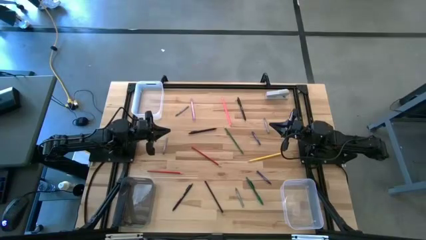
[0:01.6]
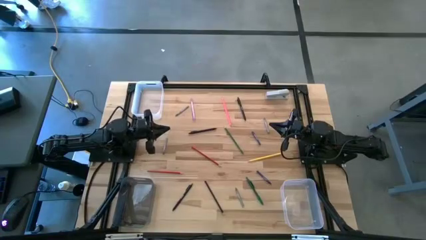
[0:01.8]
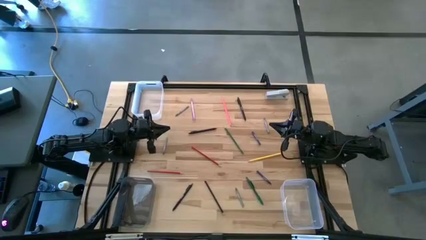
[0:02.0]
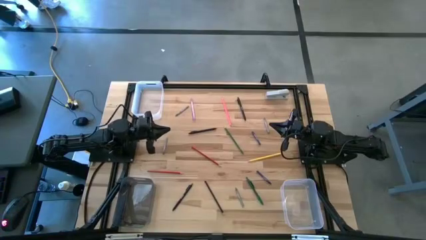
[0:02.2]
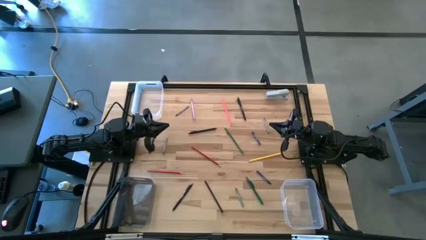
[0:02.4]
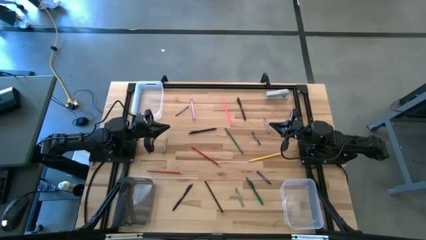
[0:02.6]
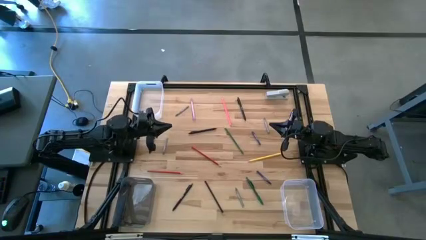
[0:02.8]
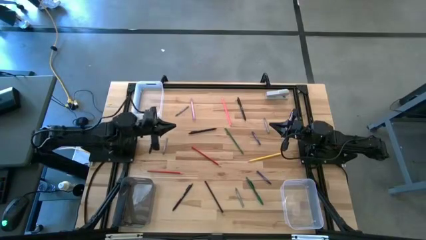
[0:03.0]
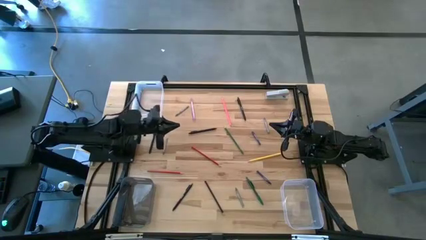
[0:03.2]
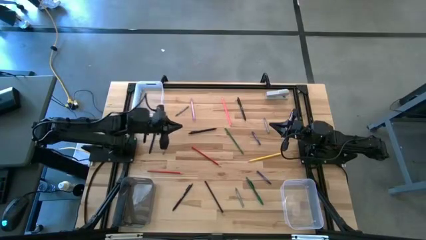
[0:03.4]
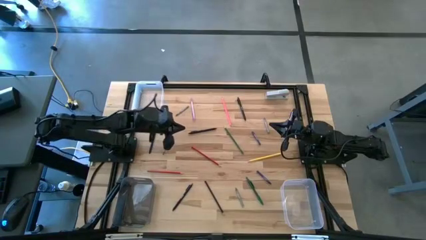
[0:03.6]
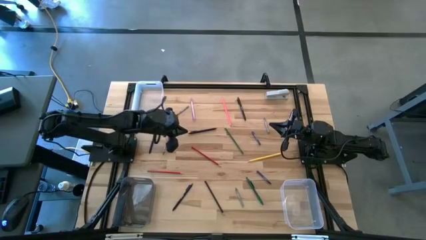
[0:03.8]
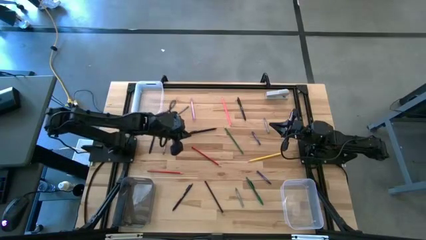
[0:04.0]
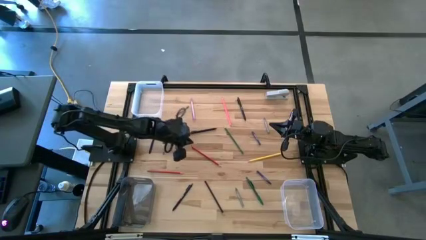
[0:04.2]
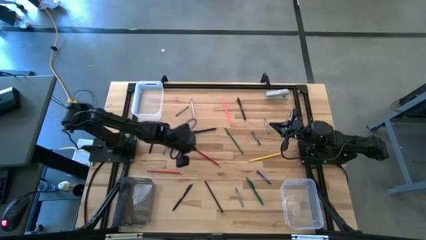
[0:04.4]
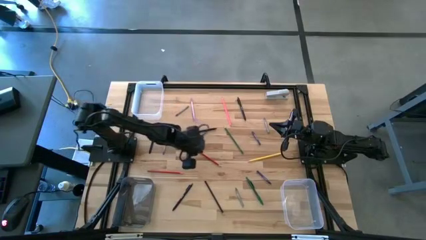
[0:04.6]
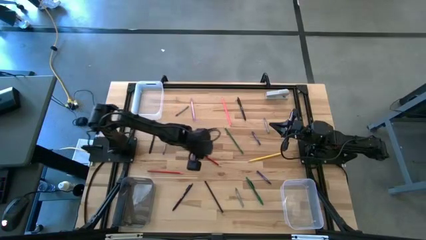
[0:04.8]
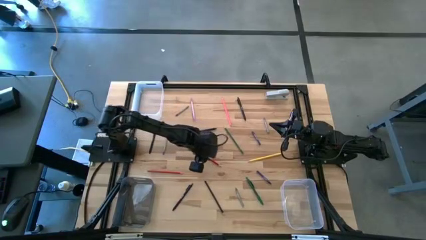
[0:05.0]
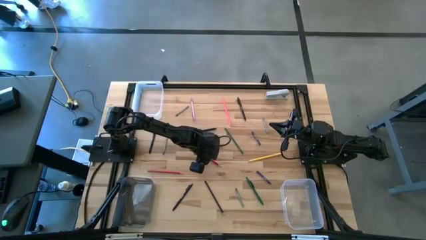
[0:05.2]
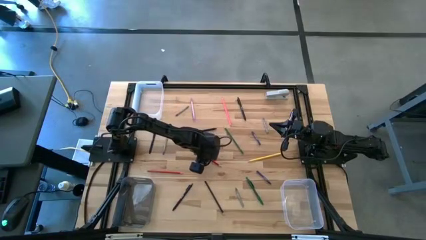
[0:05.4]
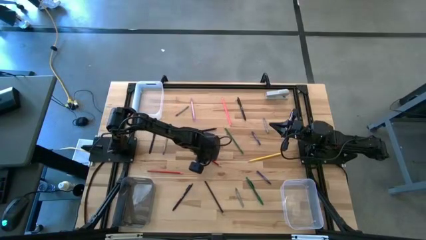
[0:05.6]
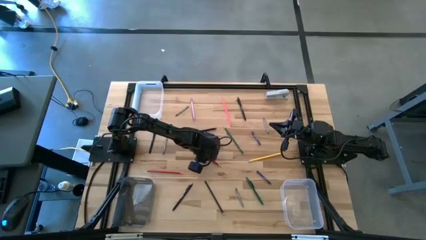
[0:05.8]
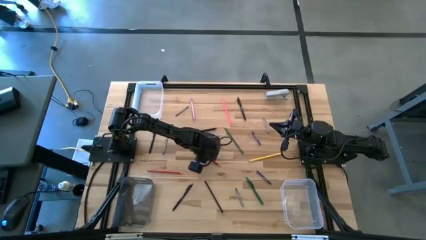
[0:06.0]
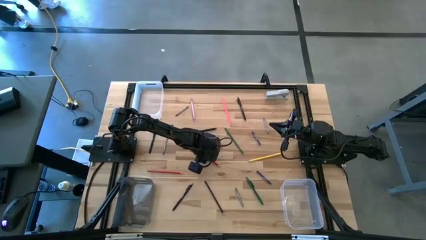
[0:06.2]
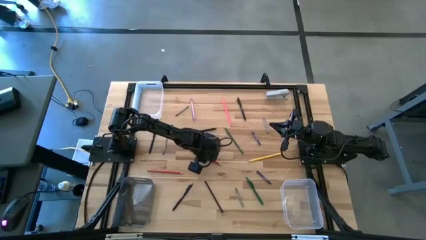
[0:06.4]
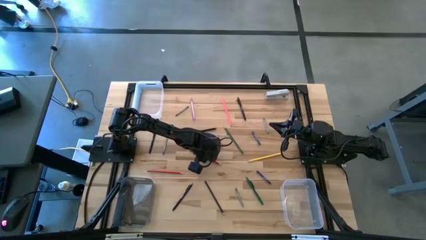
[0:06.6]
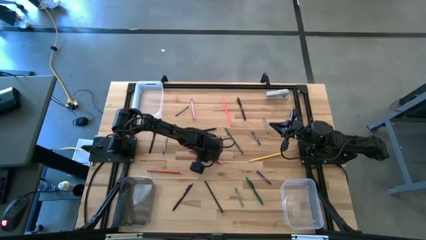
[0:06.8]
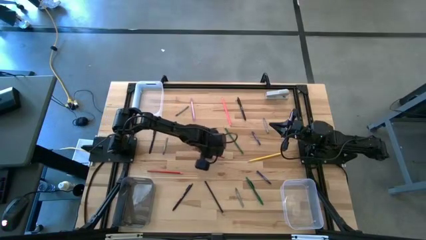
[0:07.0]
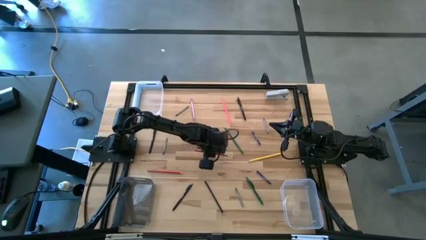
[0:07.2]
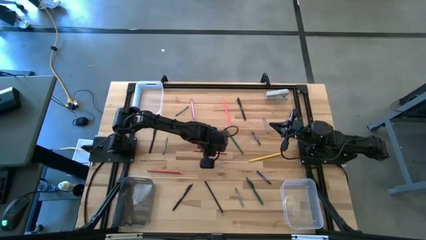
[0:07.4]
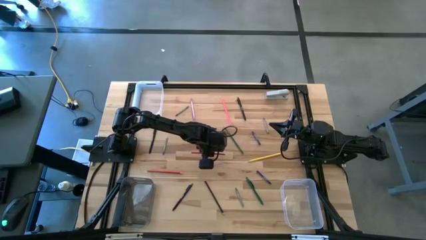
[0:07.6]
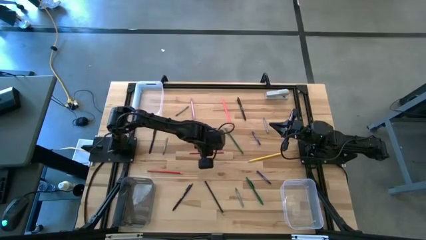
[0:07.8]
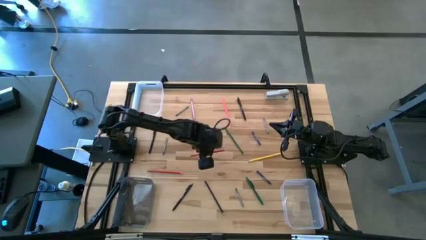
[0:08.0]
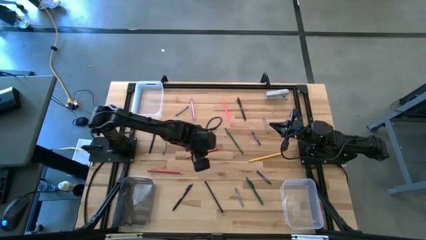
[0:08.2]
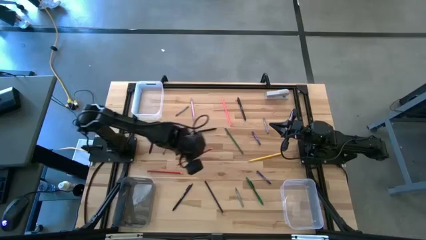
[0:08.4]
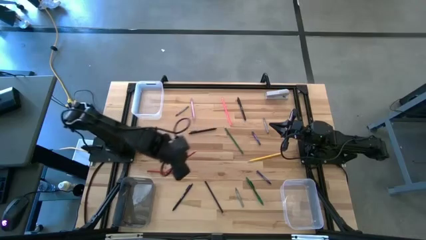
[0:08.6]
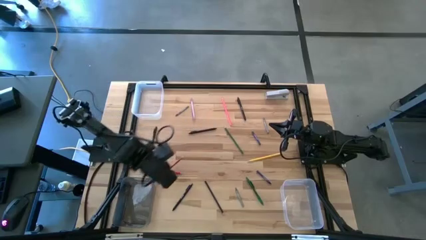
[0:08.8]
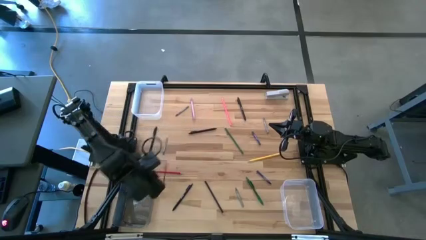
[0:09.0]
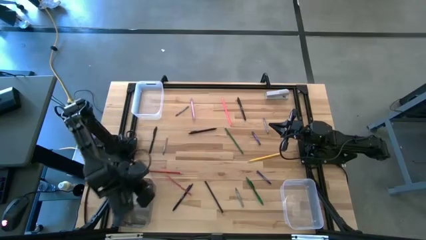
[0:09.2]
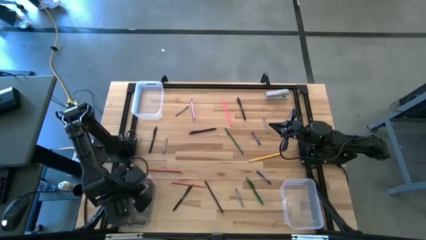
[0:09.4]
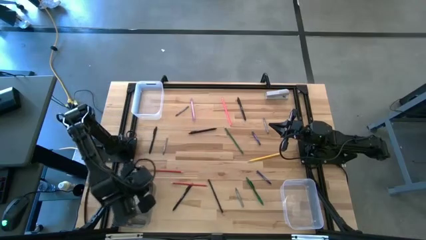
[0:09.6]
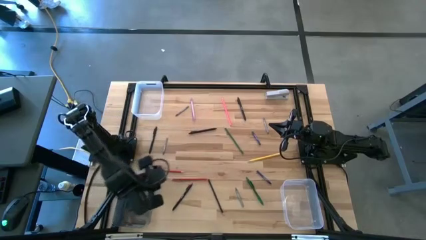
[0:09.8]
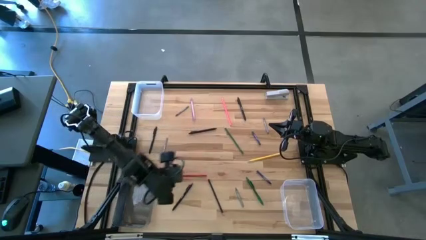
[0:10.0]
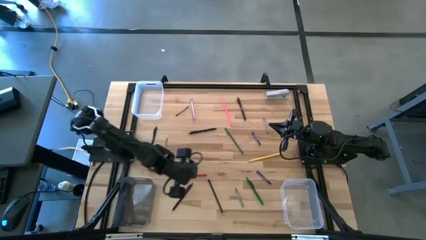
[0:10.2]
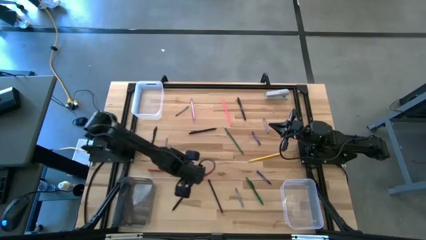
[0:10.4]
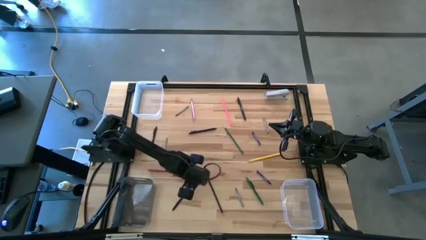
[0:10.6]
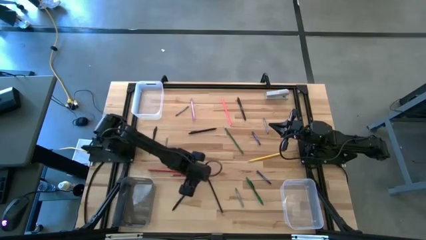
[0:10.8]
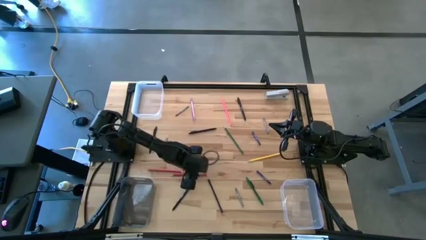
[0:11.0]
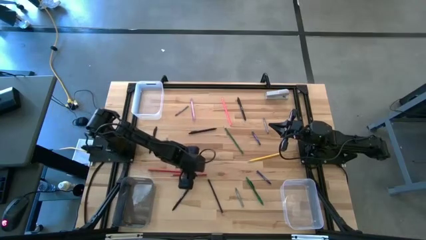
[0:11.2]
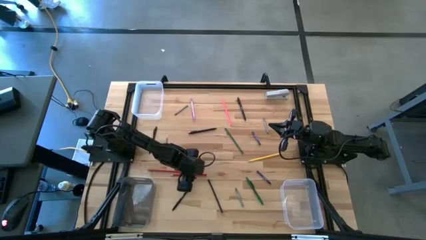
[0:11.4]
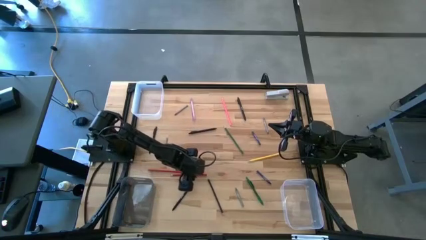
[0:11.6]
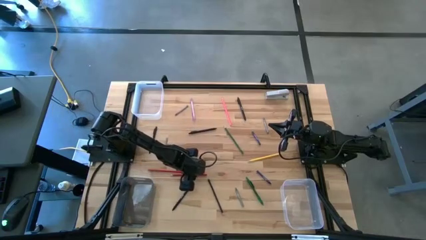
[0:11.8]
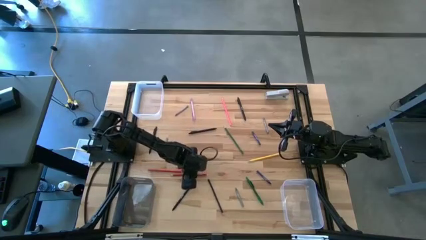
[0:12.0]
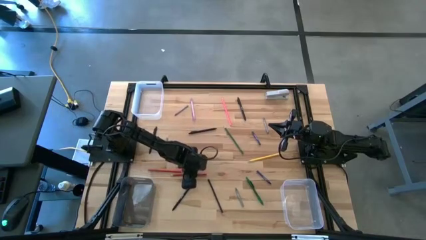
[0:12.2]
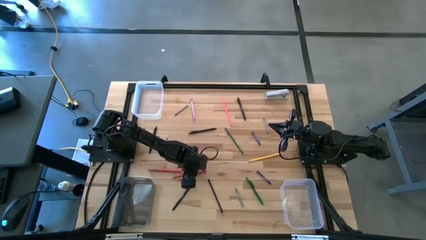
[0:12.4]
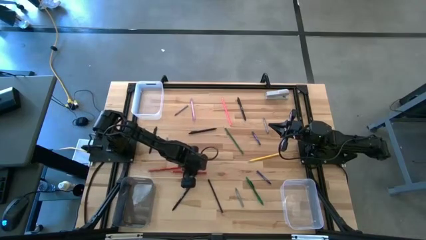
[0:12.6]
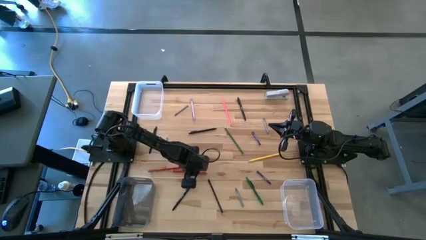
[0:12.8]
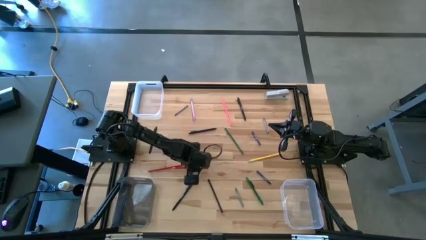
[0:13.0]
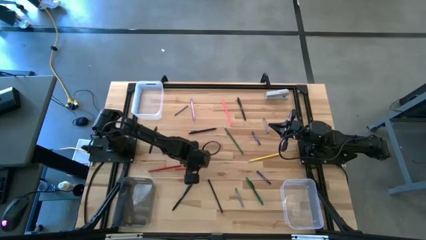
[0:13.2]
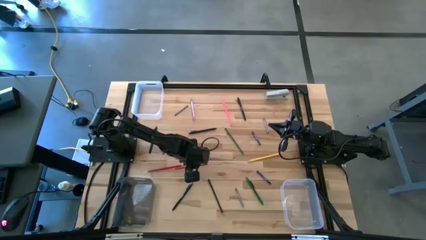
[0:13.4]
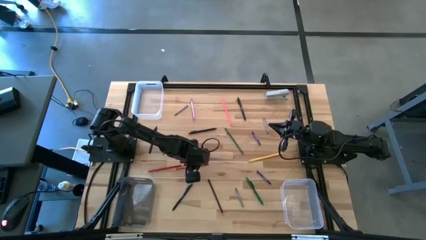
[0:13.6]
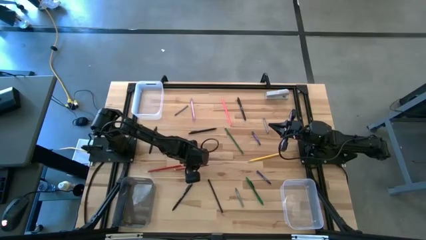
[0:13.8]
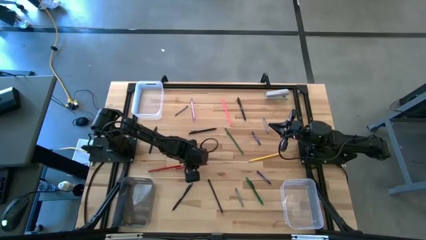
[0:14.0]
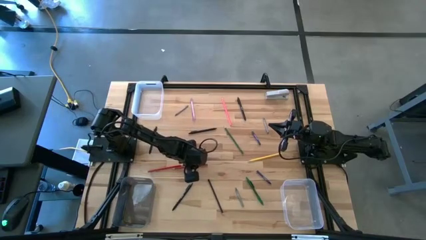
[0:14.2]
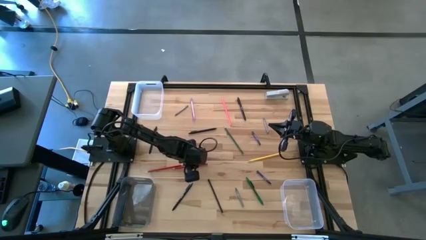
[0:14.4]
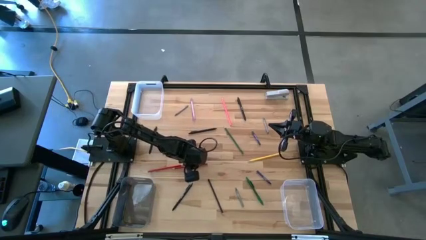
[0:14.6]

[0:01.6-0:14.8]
Task: Sort crayons/erasers/pens/pencils in bins
Put the right red pencil into the black bin

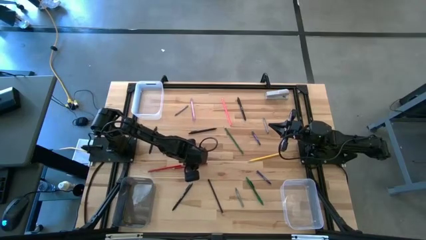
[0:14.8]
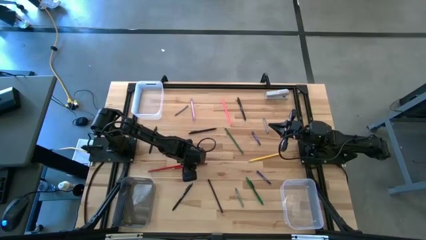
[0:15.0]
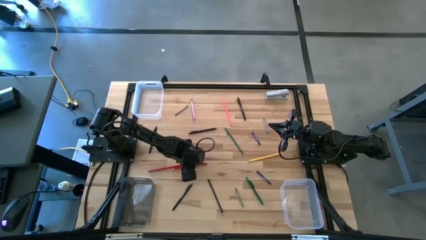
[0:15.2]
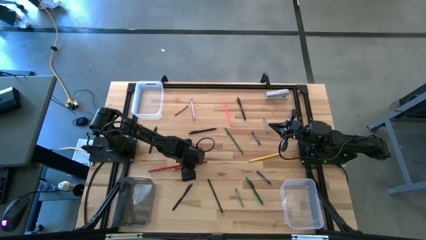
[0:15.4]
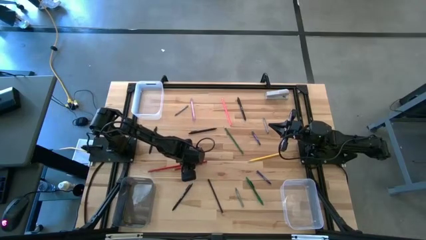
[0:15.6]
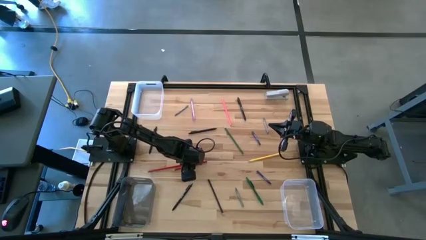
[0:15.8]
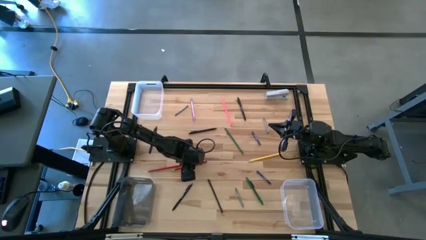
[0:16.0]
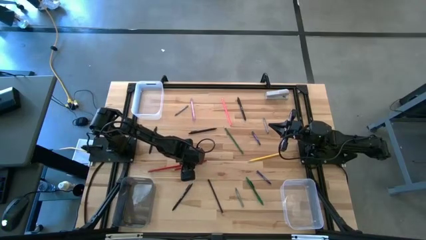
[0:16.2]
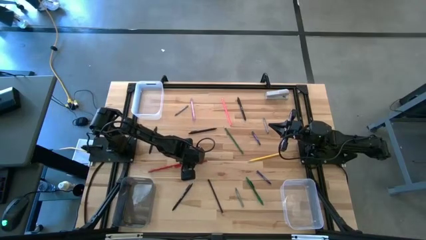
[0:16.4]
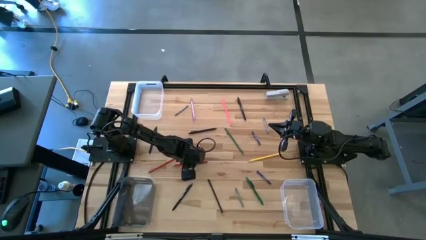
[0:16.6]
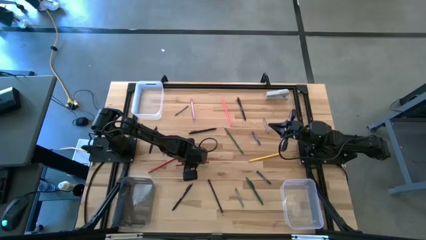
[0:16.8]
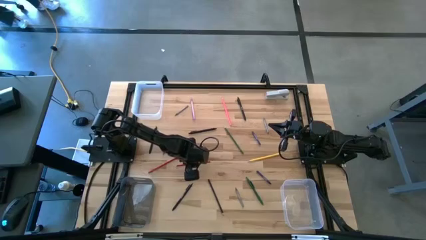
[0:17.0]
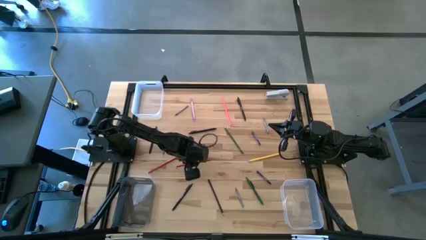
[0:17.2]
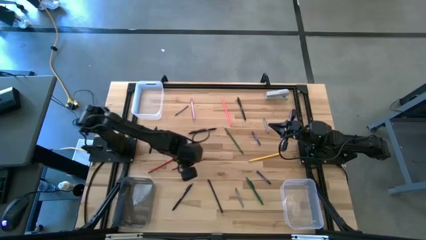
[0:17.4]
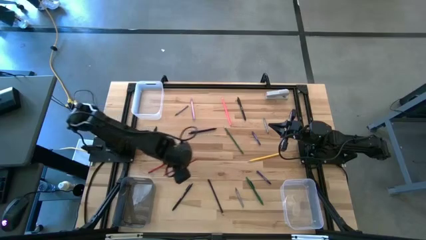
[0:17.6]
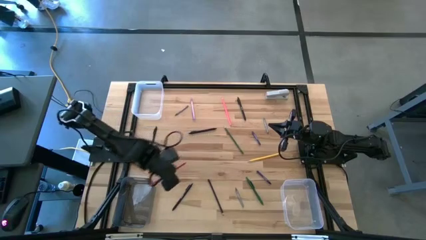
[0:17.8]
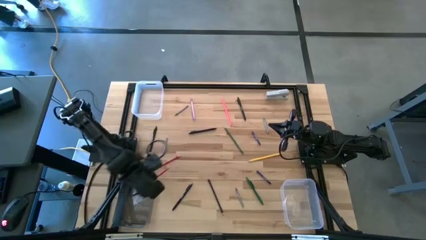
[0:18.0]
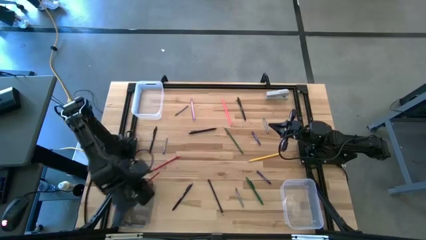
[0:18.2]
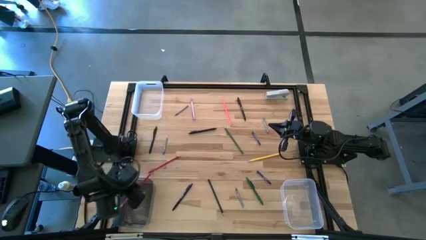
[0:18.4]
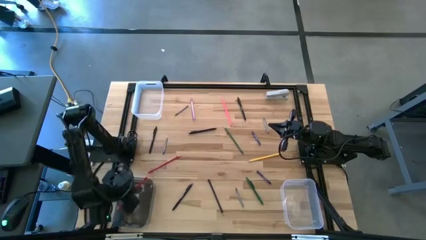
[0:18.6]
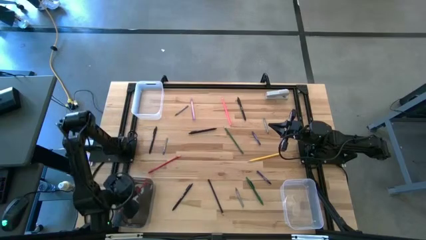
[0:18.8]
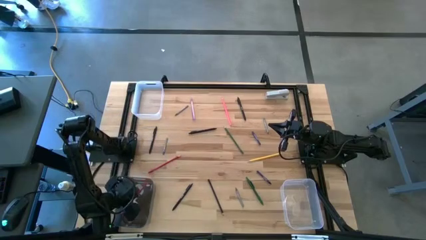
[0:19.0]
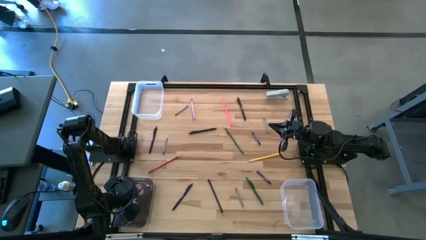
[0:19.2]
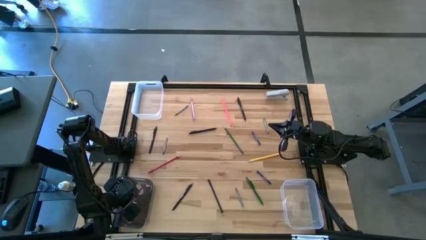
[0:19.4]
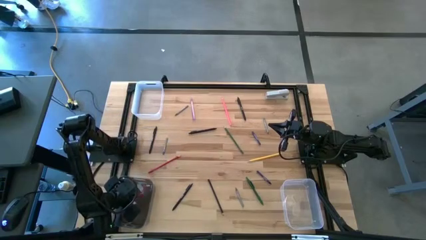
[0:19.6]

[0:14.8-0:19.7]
Put the right red pencil into the black bin
